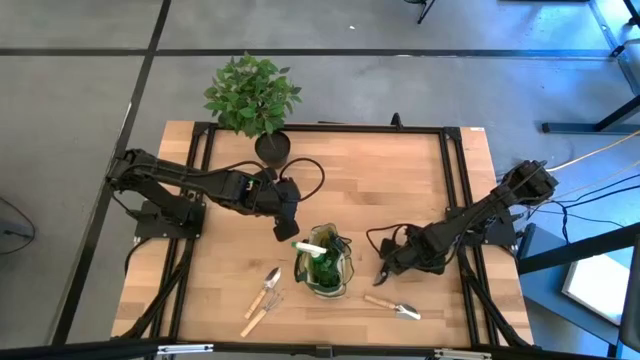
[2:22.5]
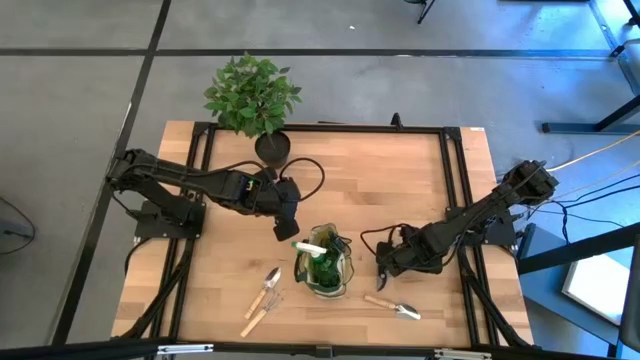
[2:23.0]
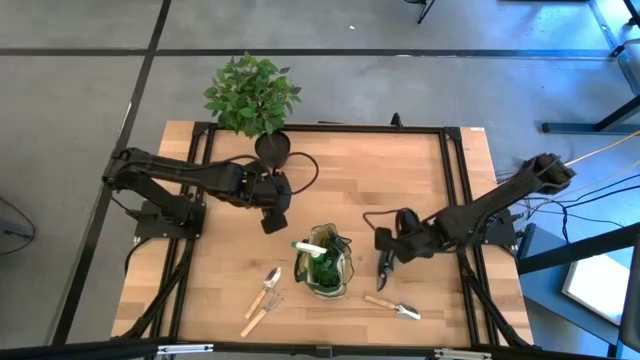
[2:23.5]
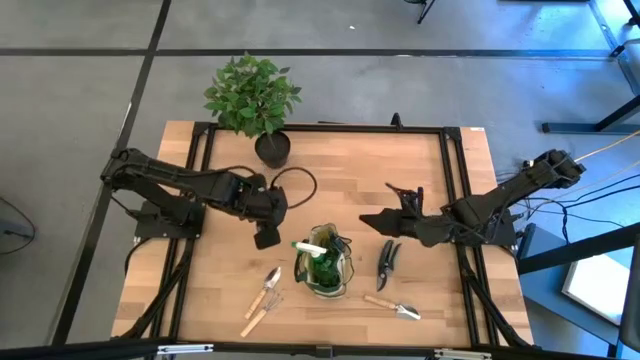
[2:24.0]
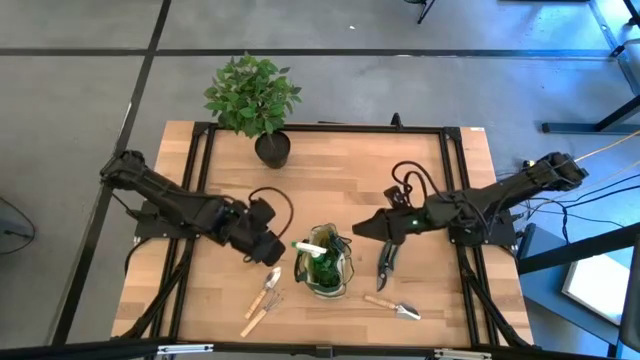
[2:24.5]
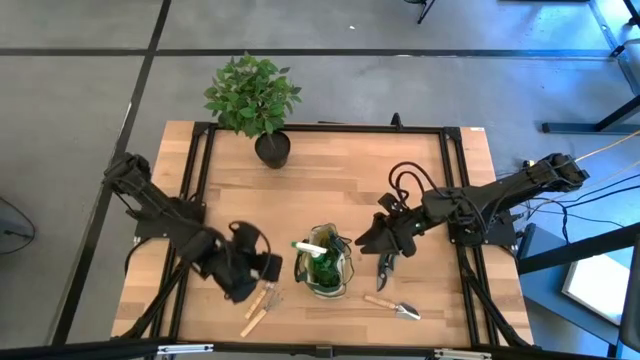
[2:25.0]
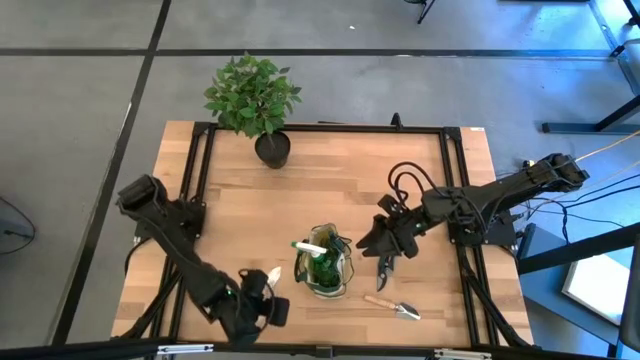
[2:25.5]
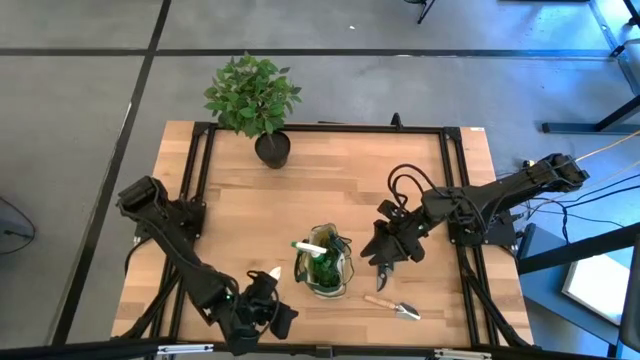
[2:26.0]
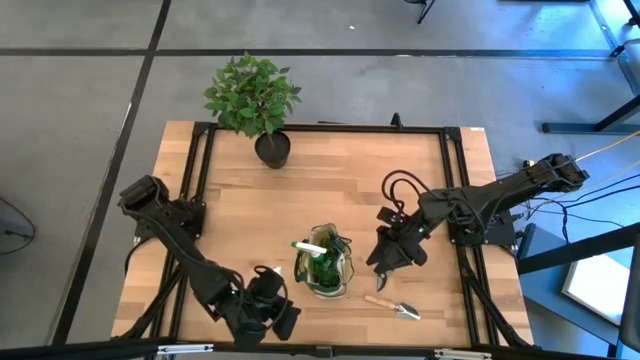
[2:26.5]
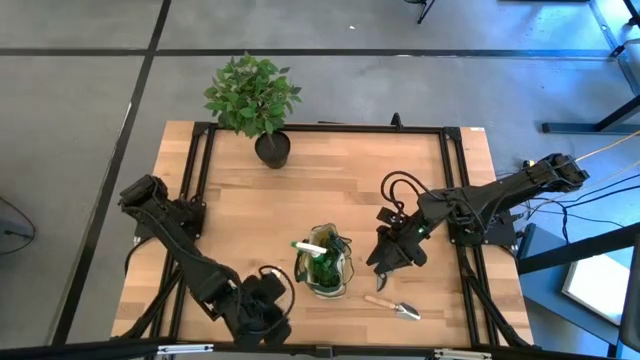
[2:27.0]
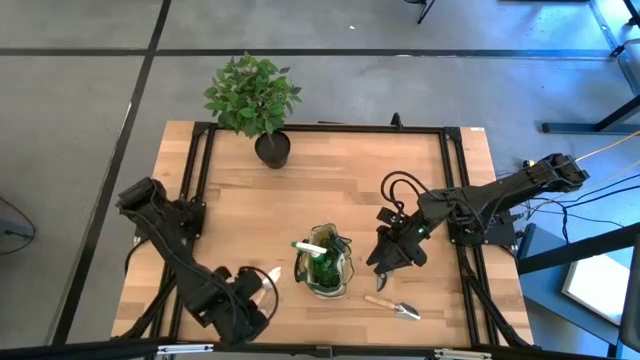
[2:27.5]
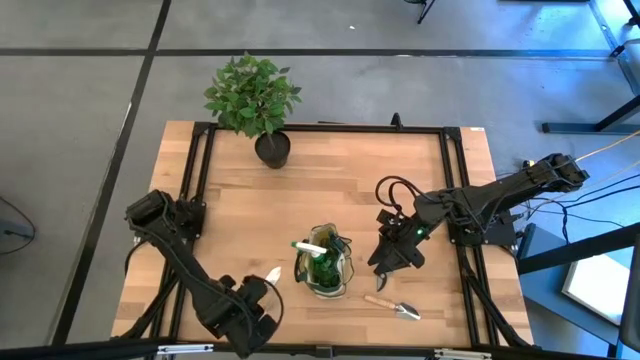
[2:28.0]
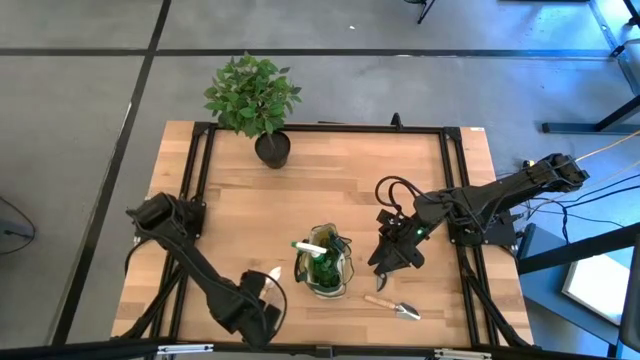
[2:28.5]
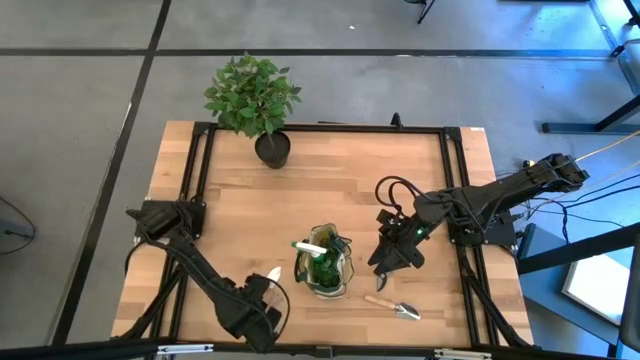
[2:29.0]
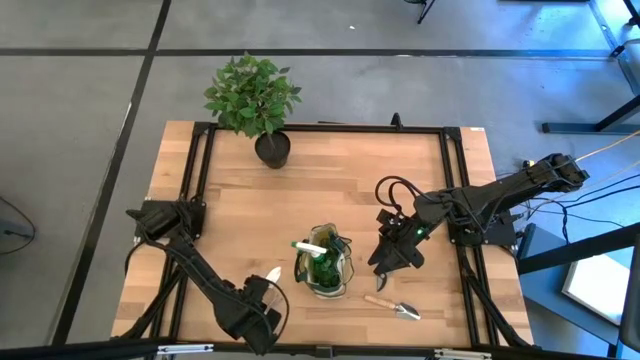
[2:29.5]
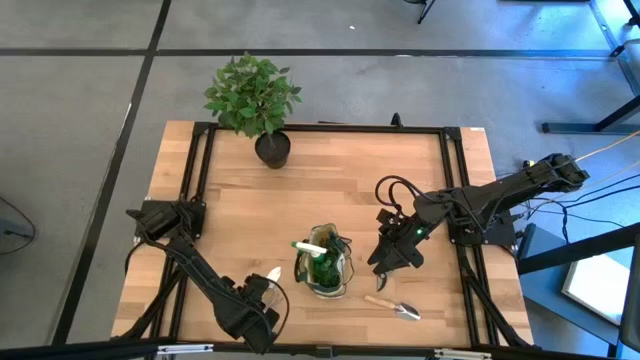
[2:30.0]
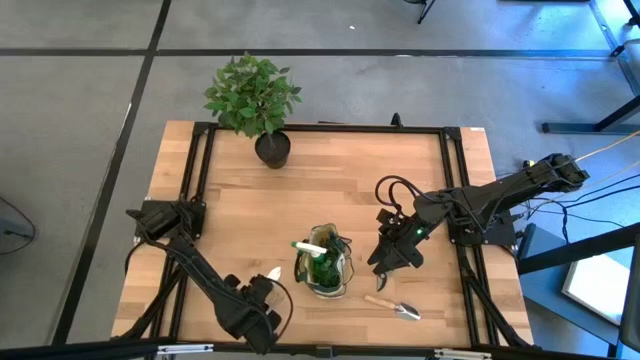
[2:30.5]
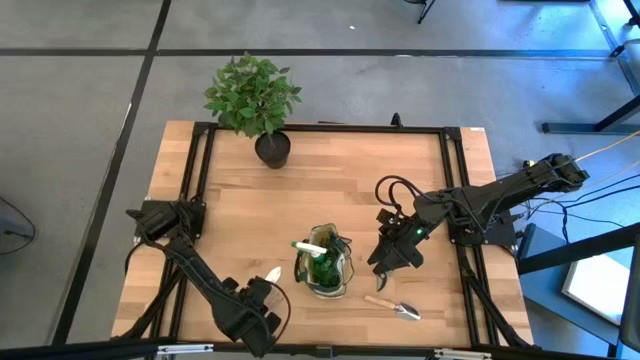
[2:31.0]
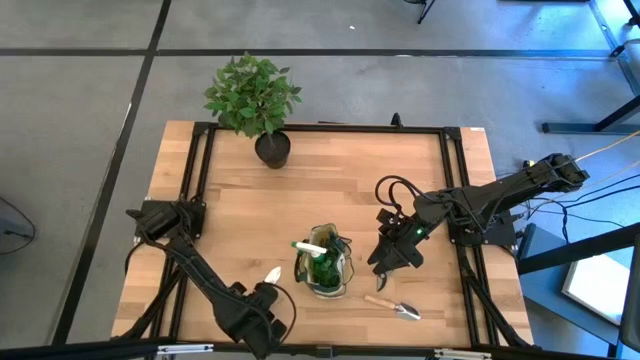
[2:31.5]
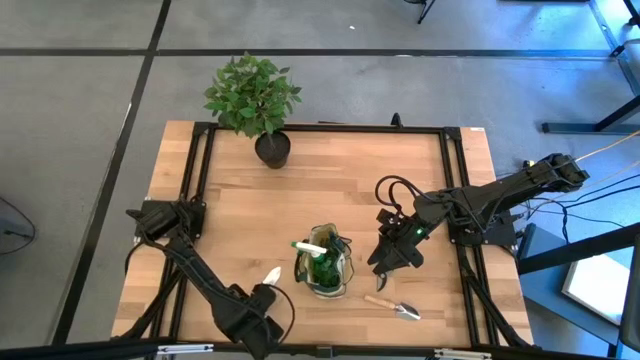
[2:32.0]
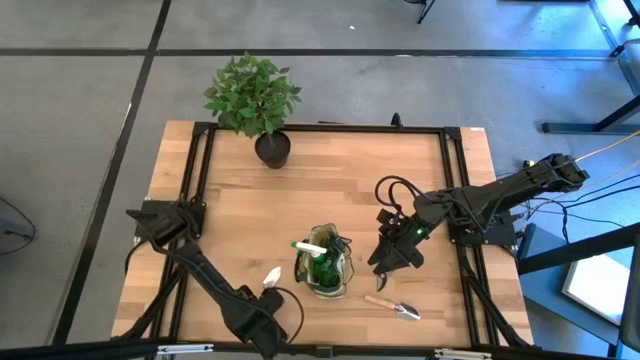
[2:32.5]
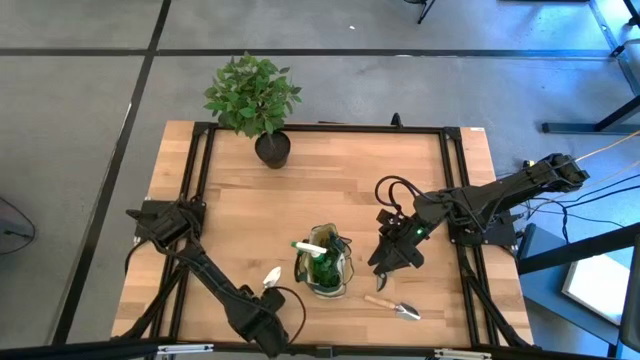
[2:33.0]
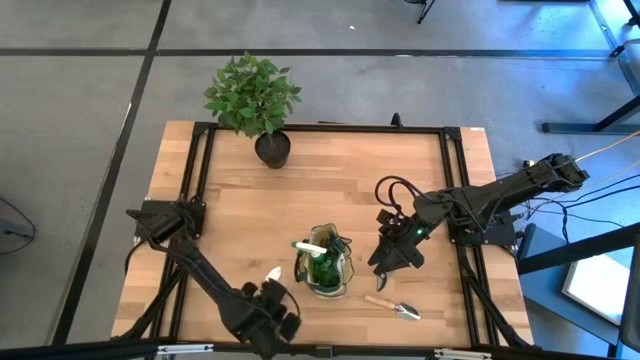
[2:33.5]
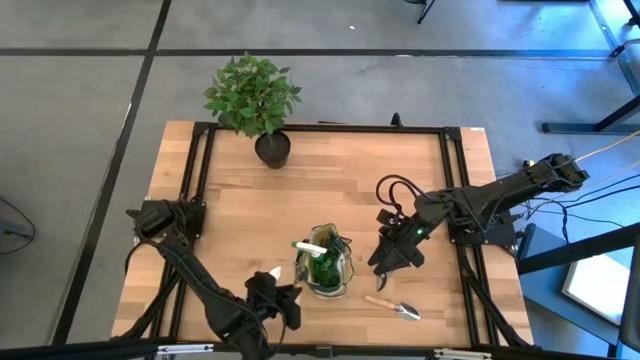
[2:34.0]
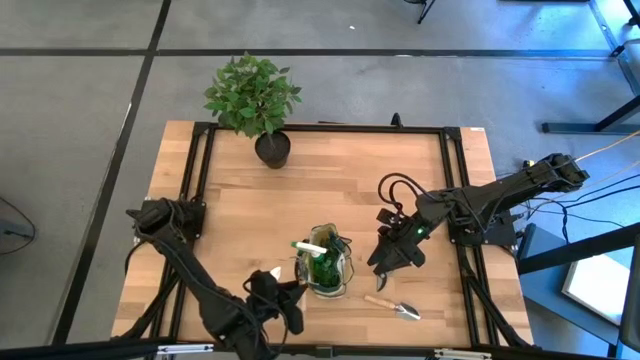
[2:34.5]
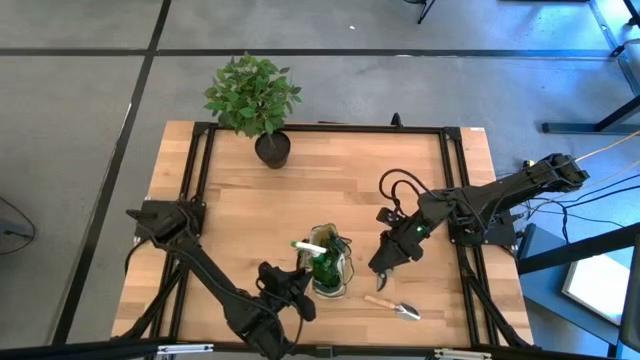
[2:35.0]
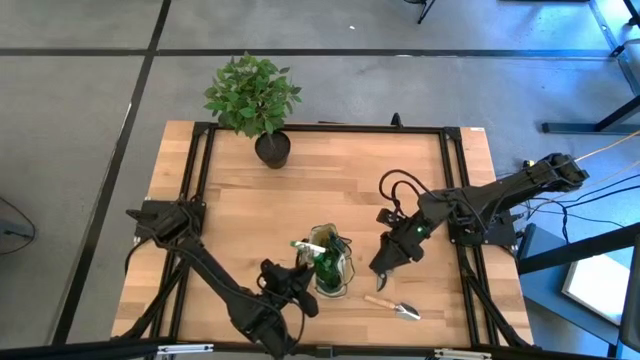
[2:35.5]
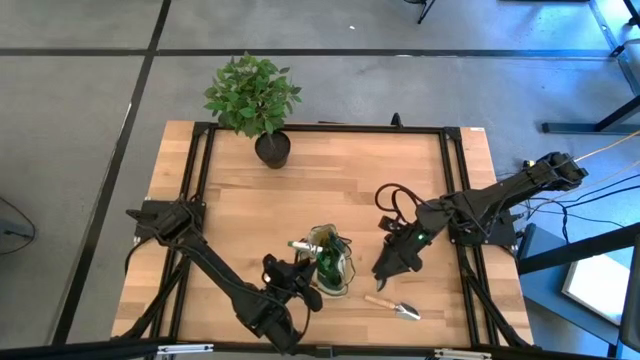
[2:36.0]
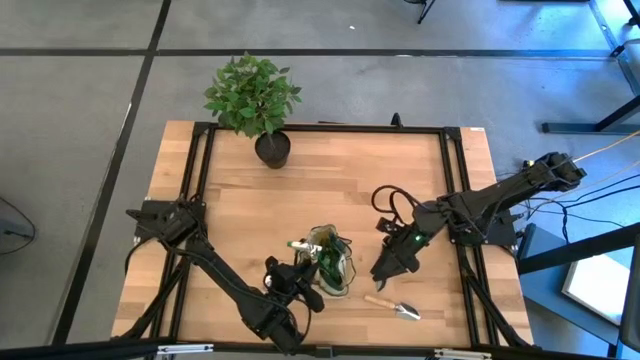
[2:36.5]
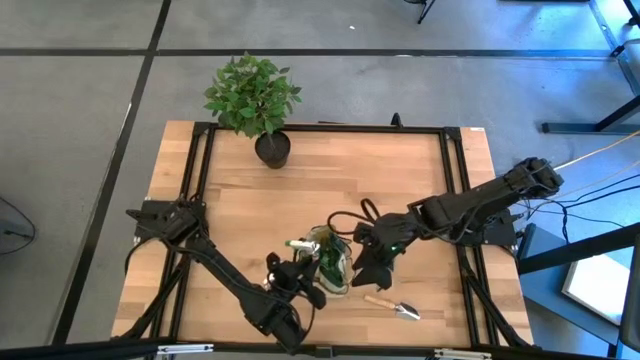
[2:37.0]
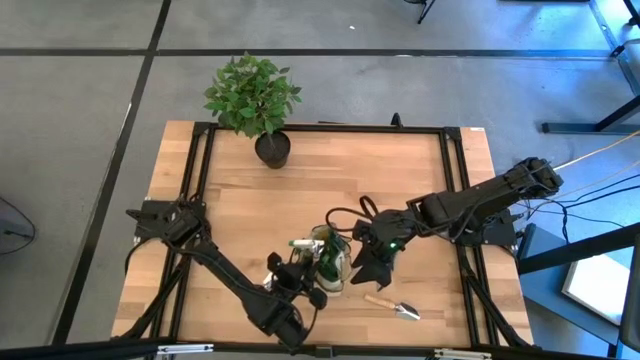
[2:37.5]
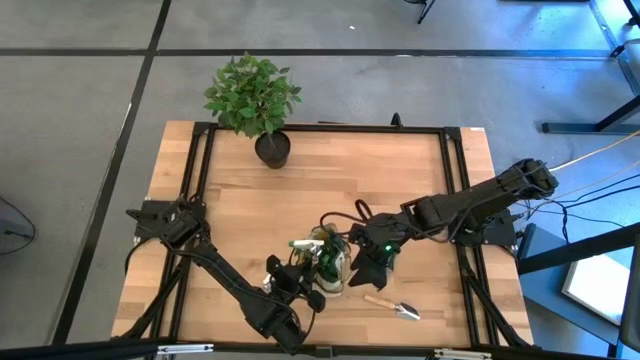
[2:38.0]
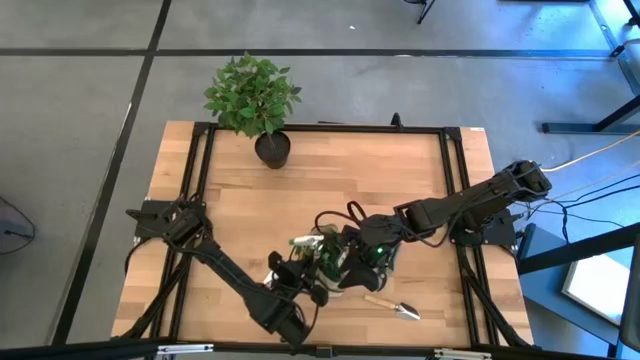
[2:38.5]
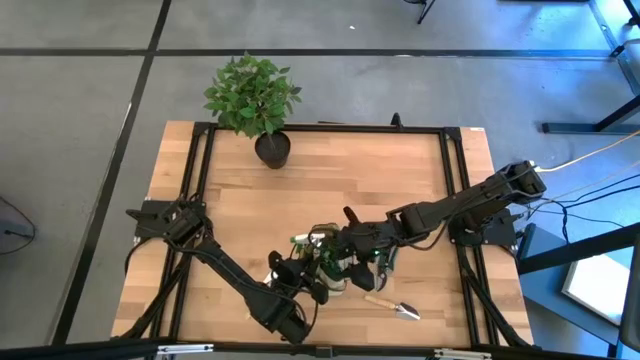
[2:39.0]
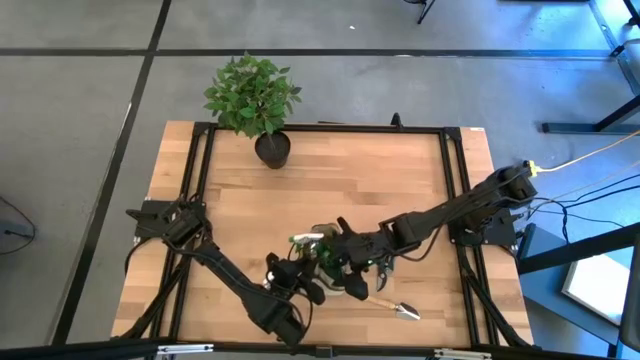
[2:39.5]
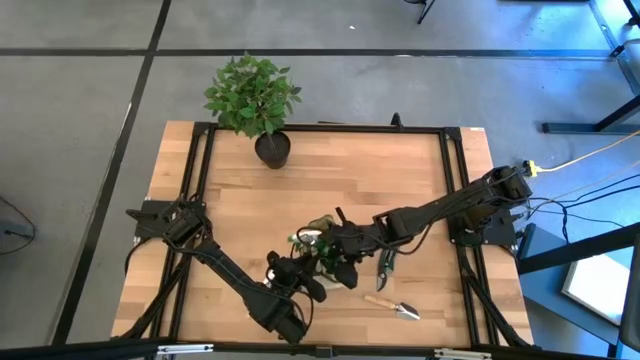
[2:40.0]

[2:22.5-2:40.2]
Task: Pick & Place Garden tools in Gardening bag
Put the brown hand rake into the brown gardening bag

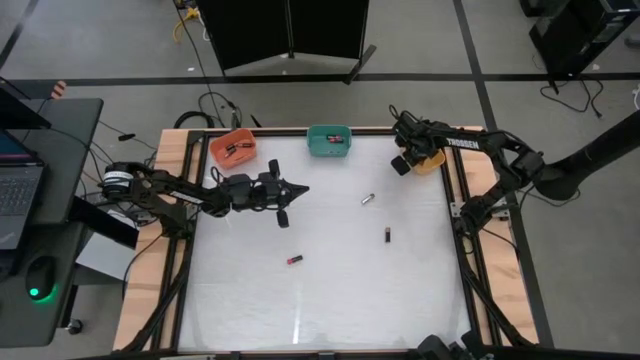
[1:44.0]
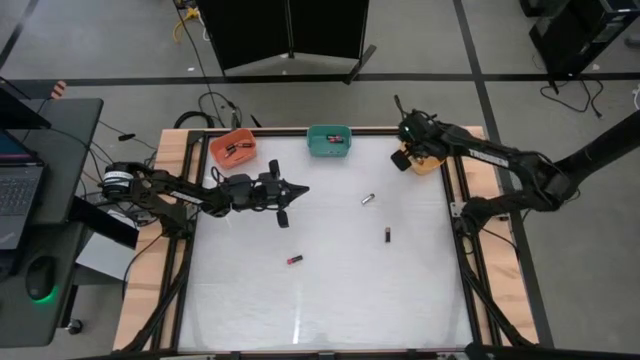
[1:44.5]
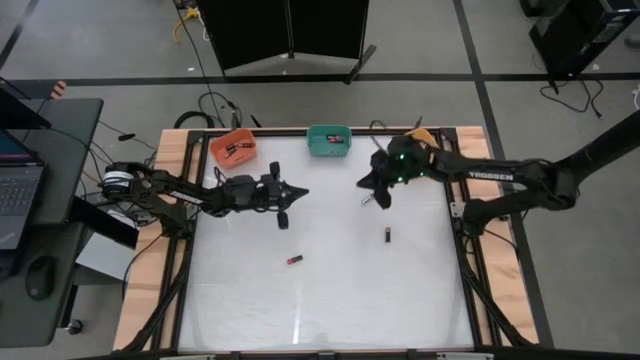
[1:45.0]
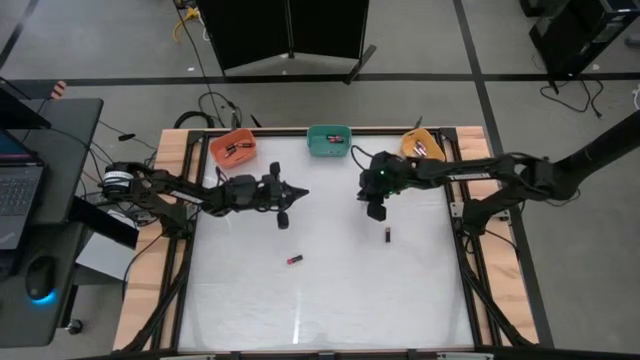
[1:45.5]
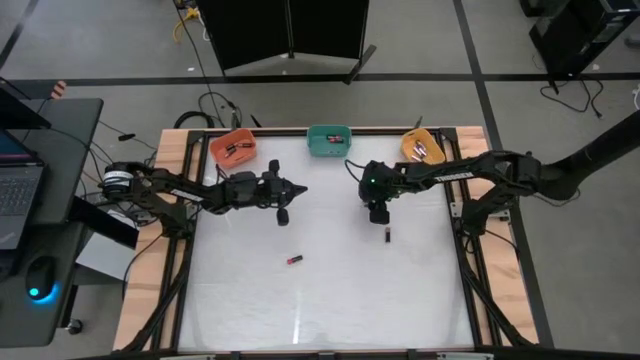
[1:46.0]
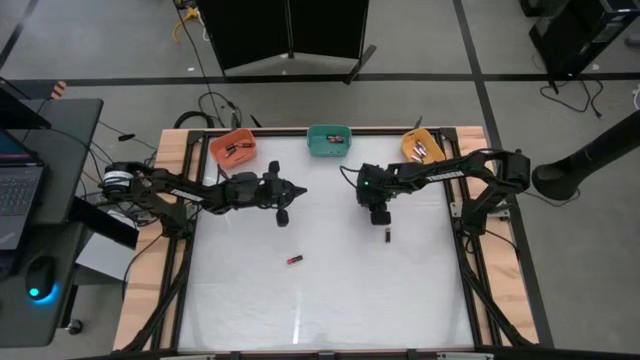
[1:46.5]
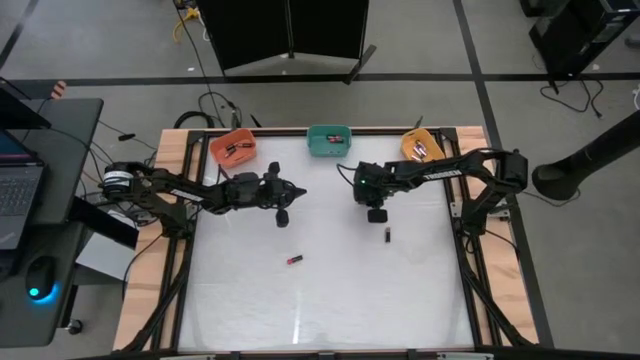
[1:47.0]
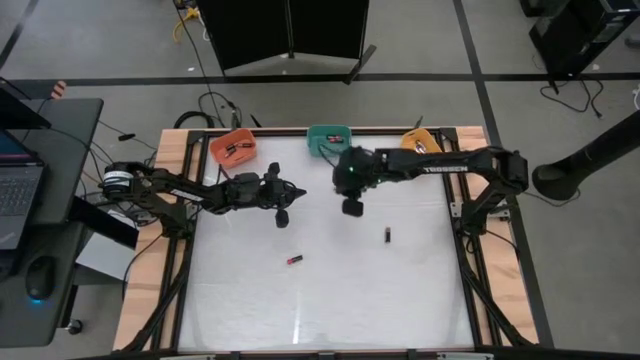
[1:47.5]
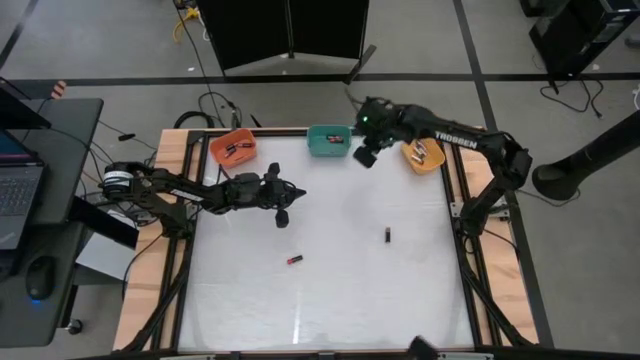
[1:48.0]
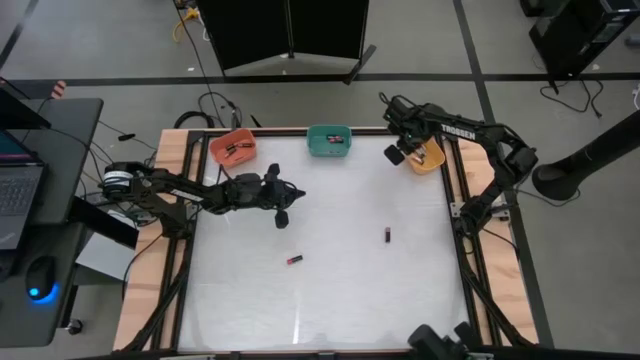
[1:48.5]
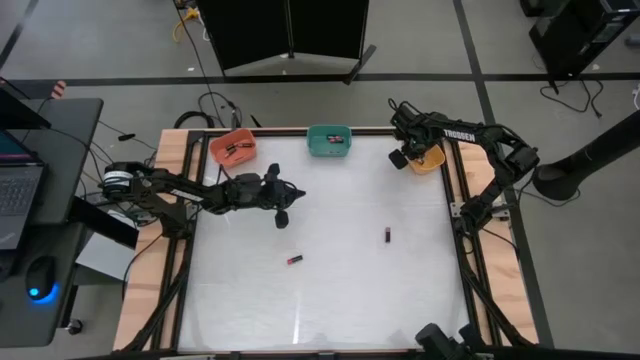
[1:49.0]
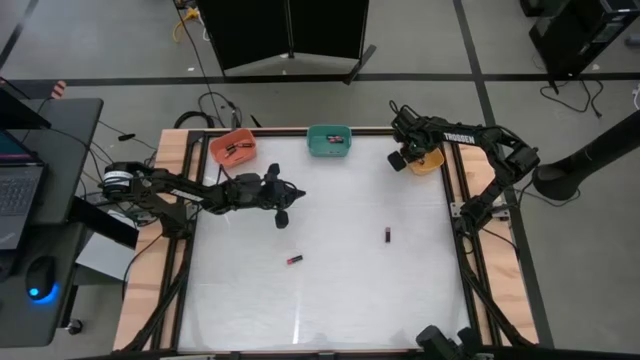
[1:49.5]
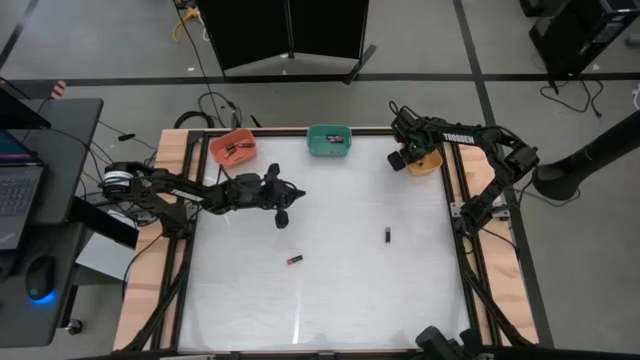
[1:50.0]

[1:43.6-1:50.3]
Task: Sort batteries
Put the silver battery into the yellow bin
